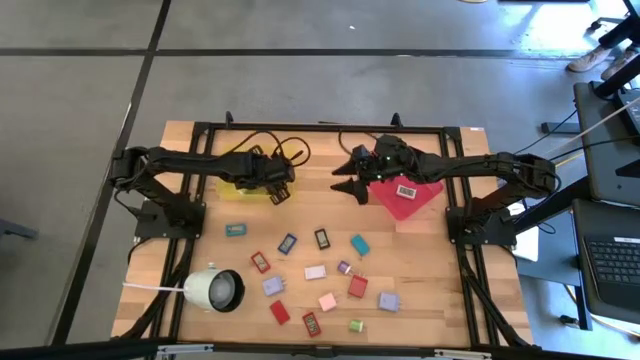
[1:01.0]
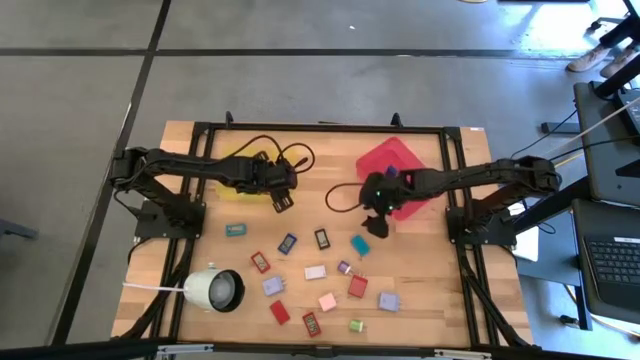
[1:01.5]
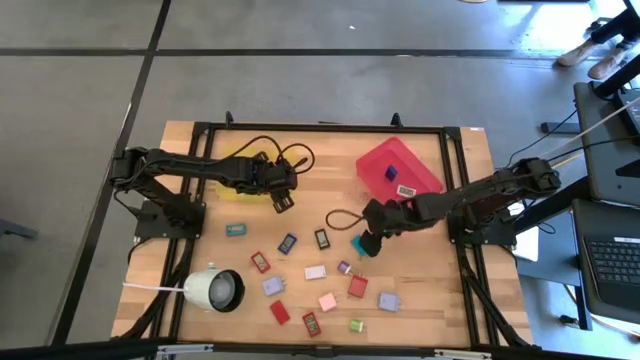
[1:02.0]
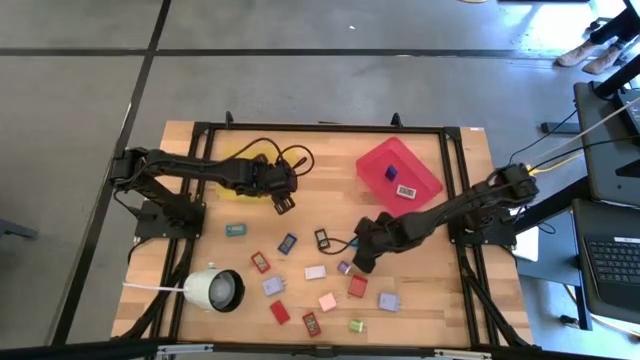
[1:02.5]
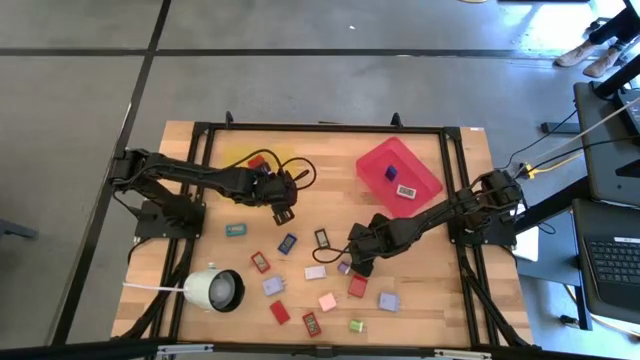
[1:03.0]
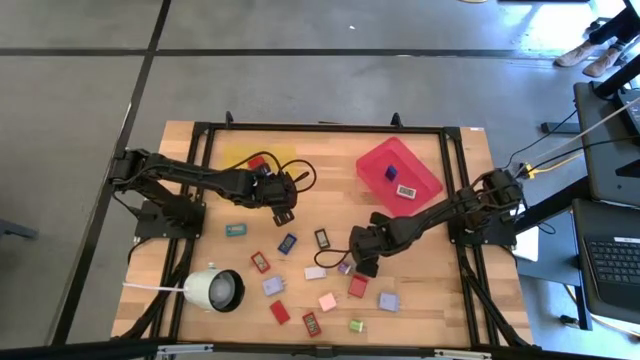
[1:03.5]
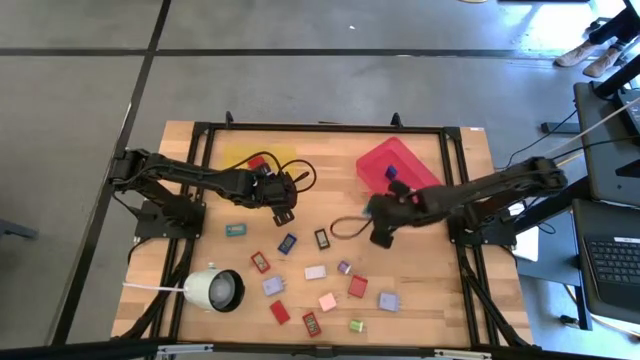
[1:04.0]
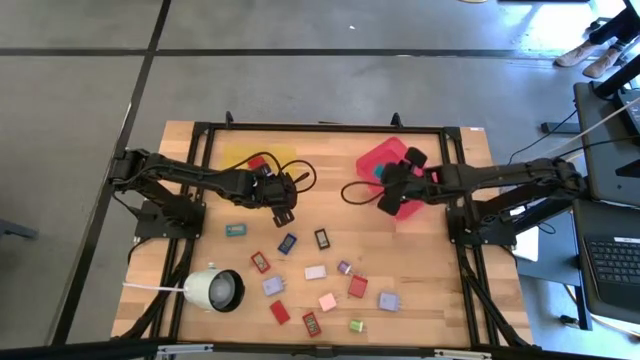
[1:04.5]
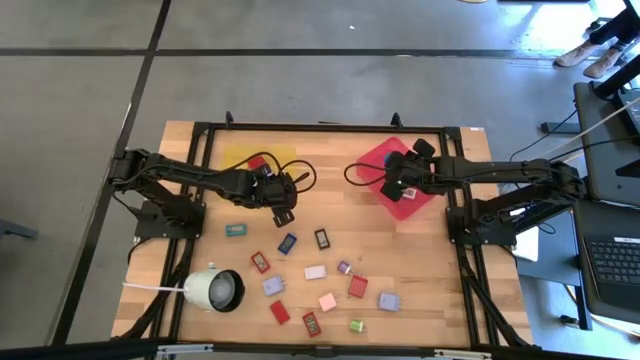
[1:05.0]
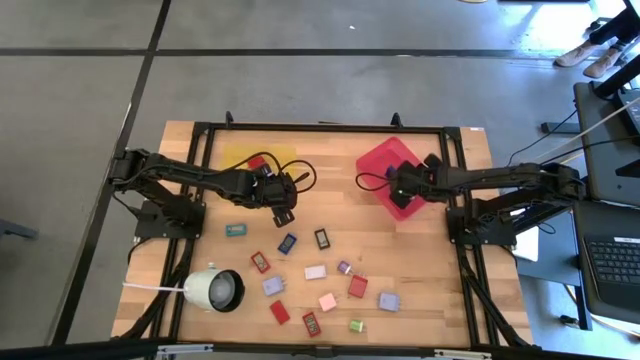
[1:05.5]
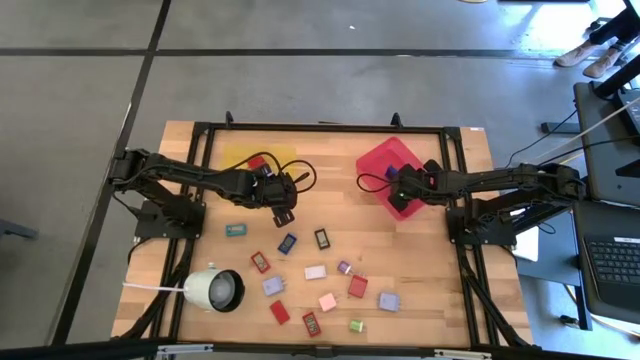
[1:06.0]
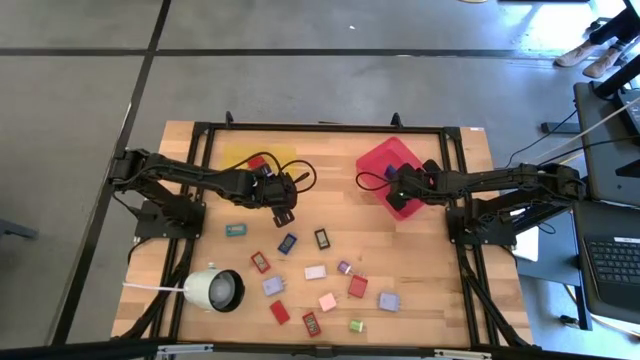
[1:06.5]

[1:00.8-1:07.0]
Task: Pick & Place Office items
Put the right light blue digital clock into the pink bin

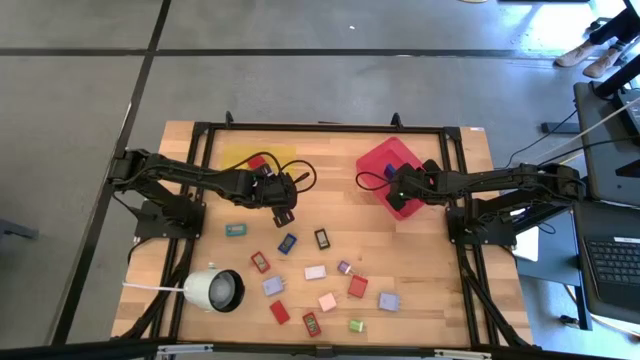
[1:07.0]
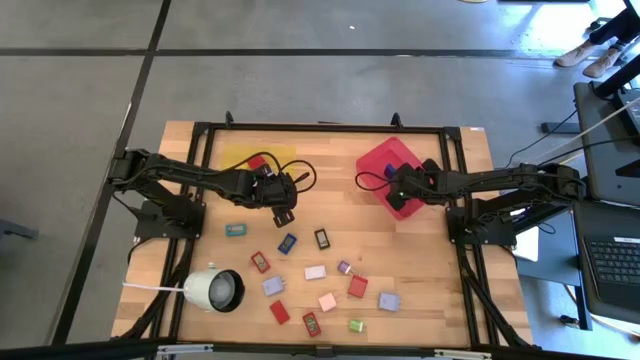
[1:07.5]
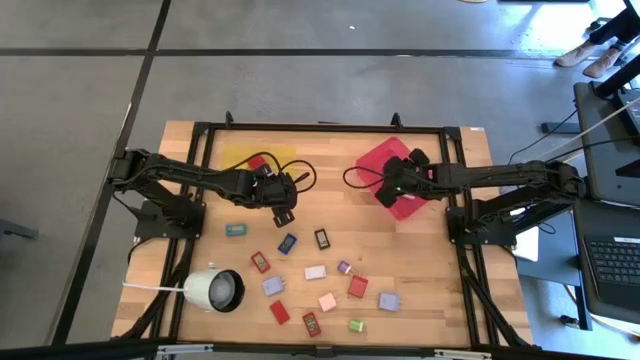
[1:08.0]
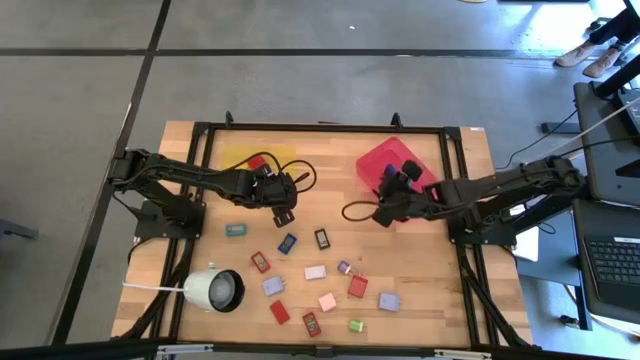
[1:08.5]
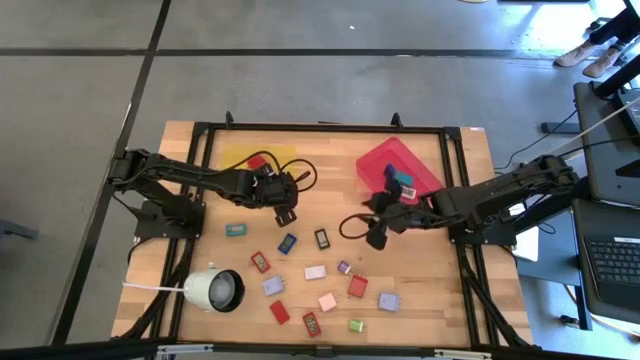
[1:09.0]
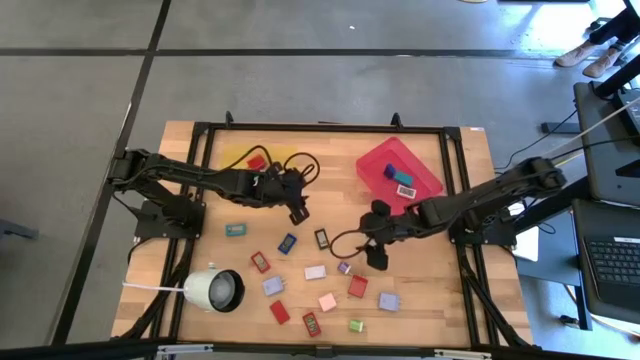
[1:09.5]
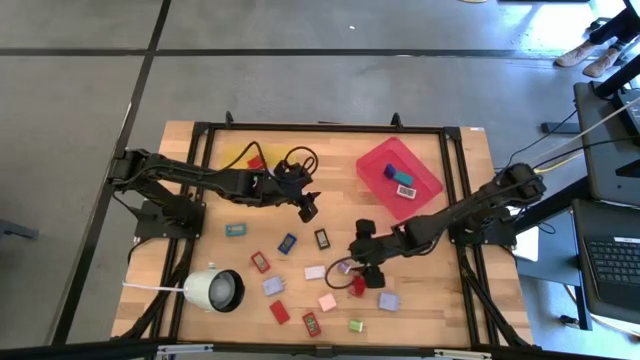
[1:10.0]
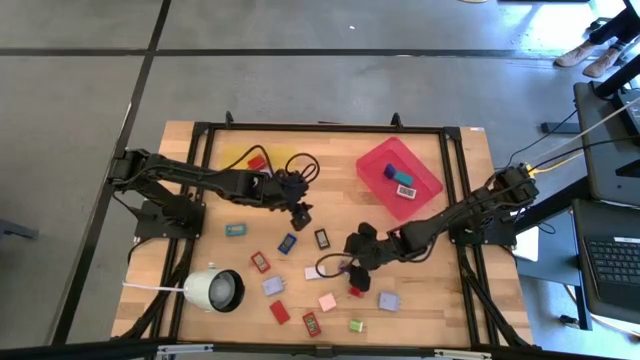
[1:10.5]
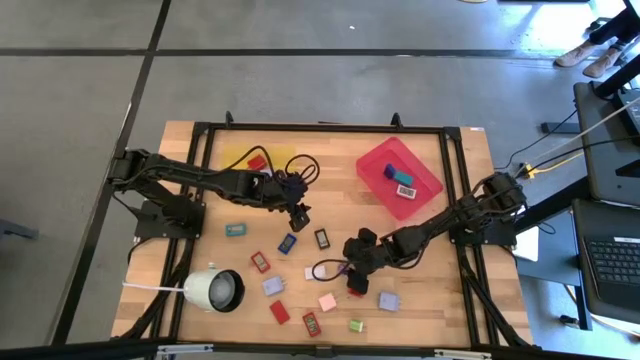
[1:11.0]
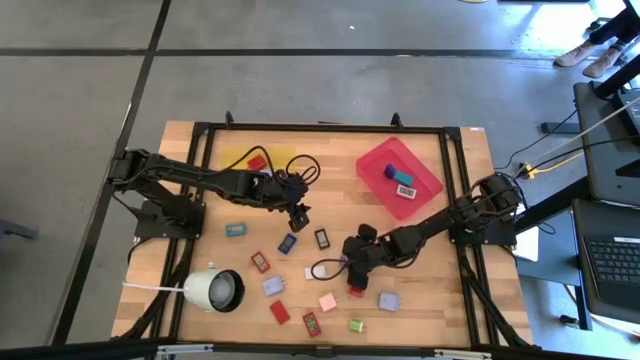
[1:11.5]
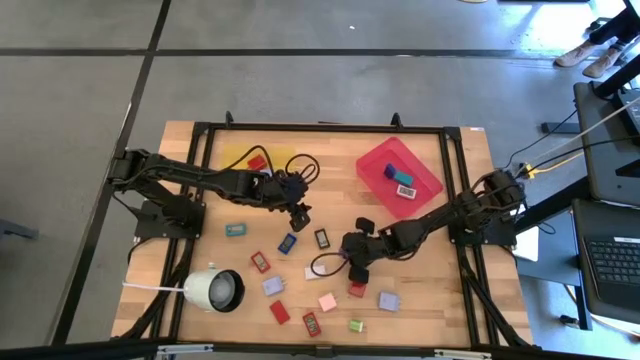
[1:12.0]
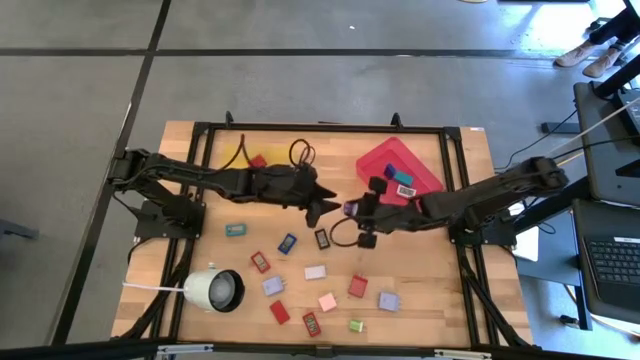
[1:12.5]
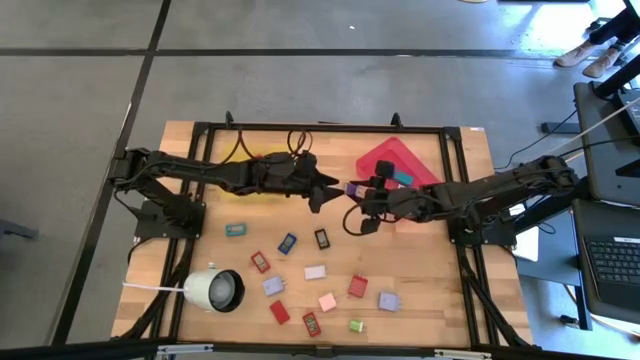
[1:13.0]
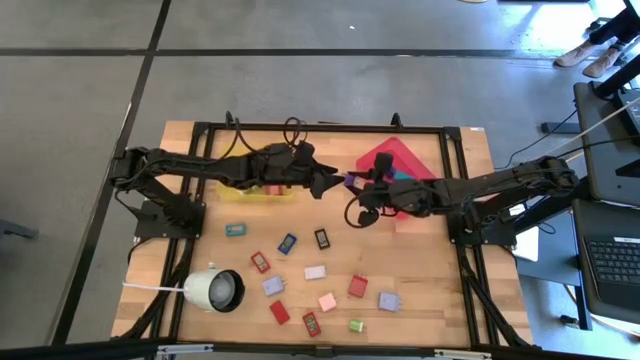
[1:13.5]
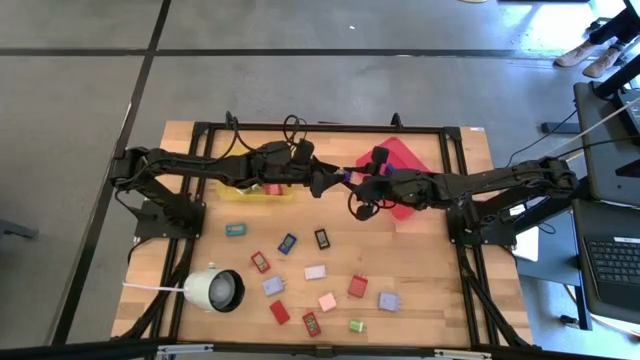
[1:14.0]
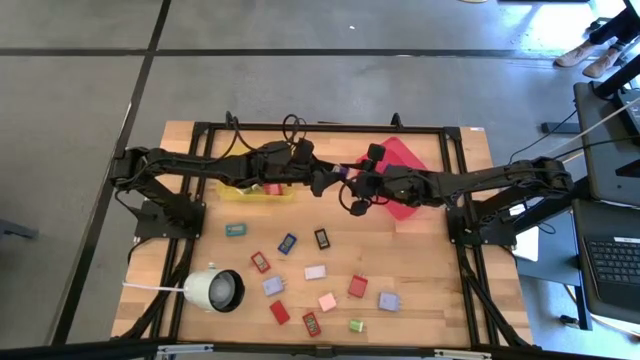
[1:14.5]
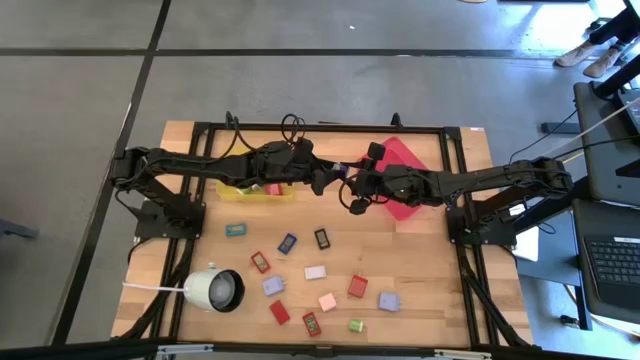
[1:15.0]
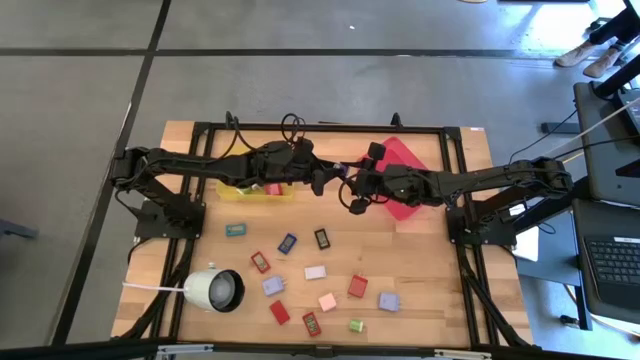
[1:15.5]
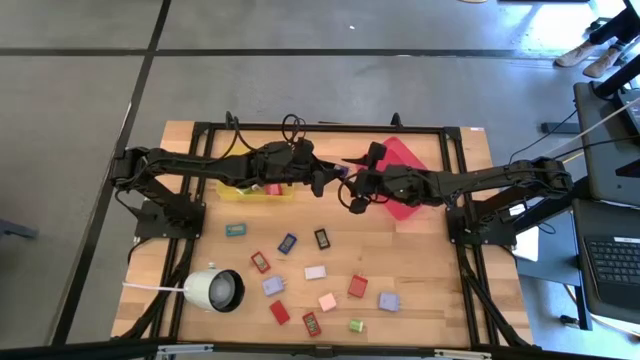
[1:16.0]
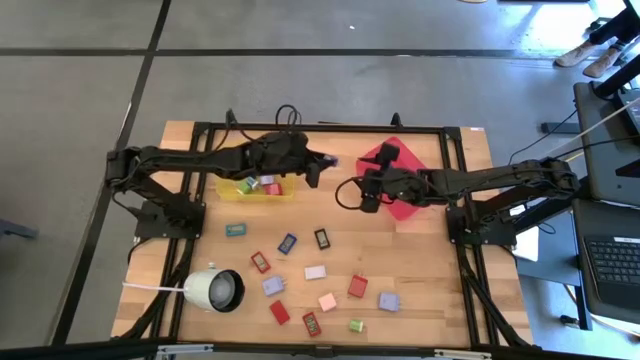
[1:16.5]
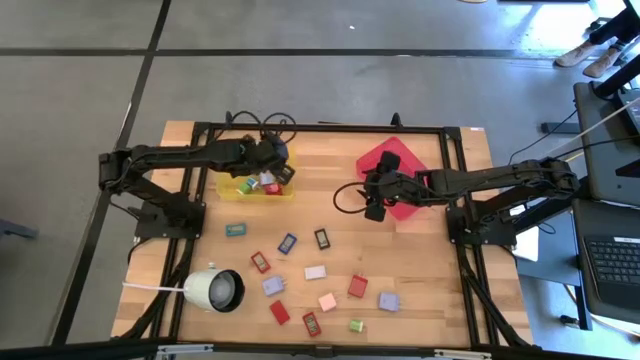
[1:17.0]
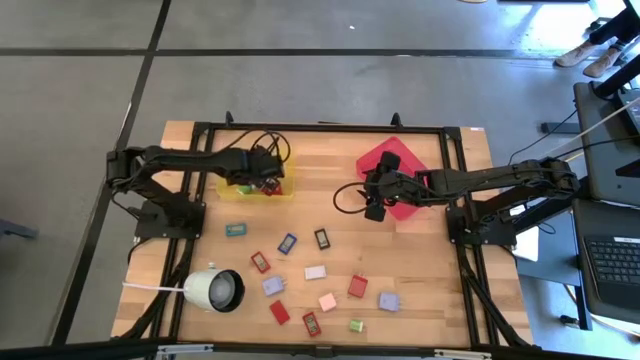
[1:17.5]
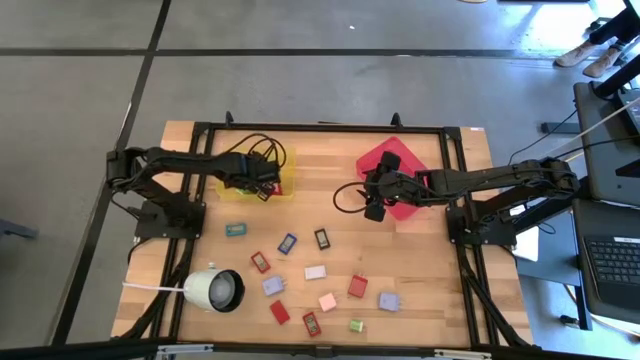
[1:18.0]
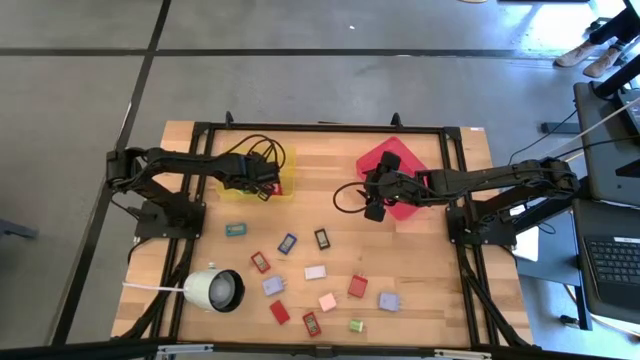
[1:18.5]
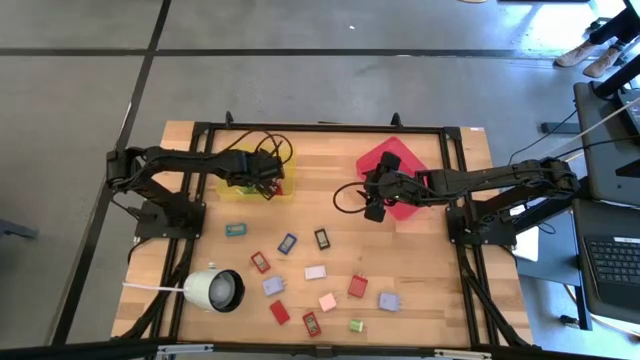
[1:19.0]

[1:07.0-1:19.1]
Put the purple charger adapter into the yellow bin

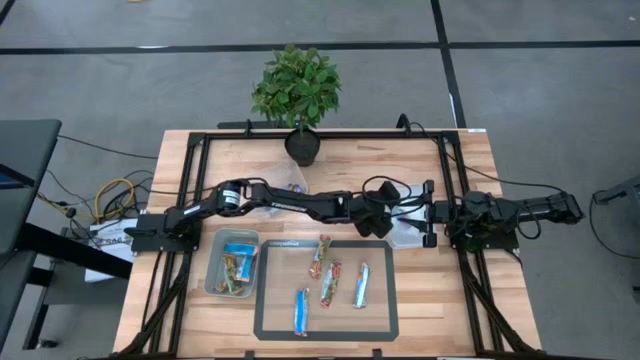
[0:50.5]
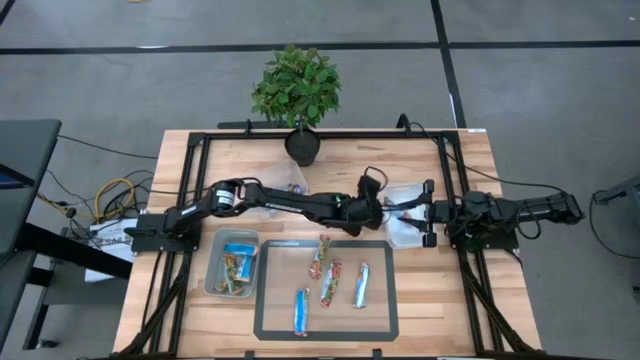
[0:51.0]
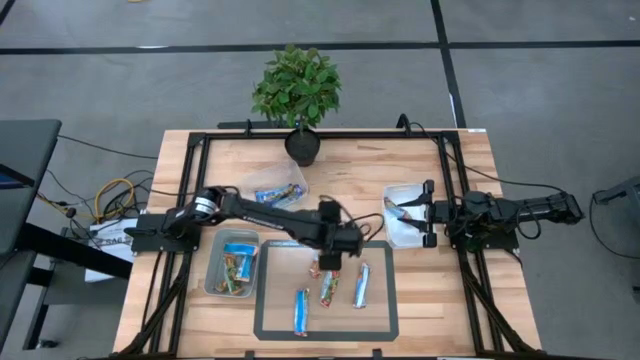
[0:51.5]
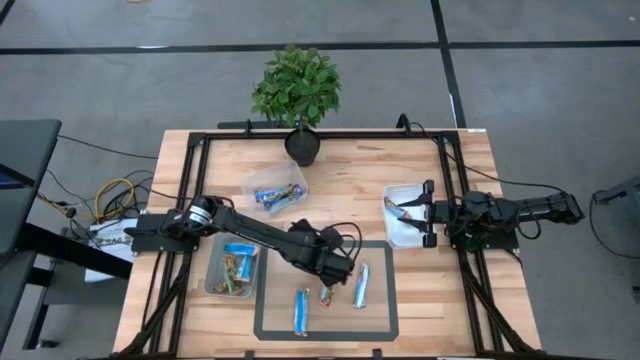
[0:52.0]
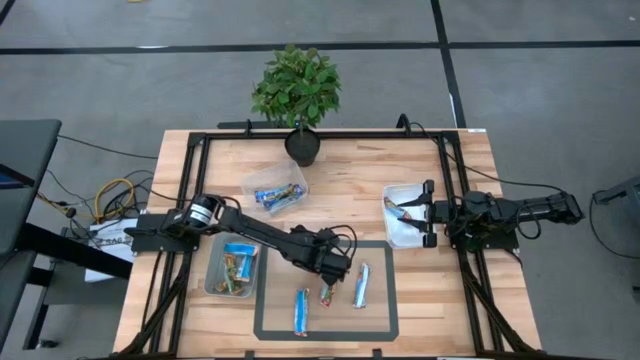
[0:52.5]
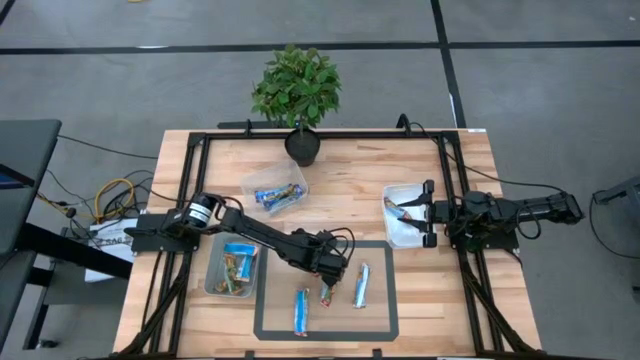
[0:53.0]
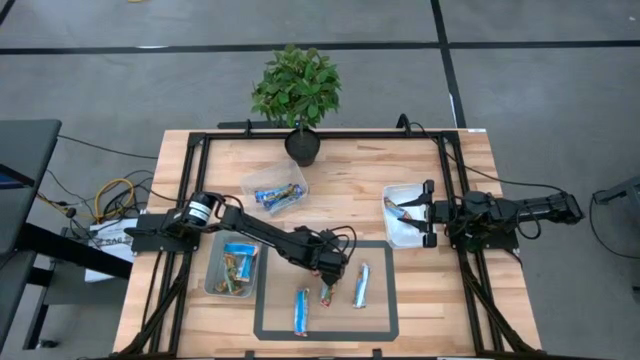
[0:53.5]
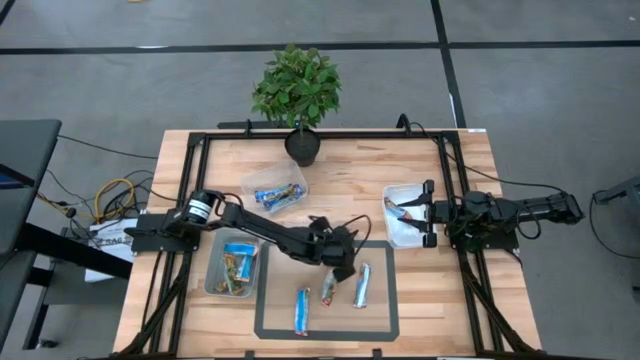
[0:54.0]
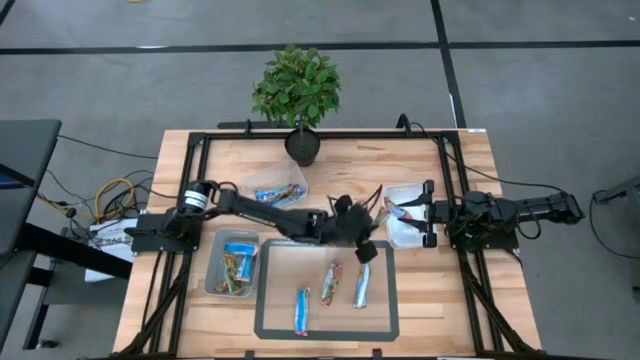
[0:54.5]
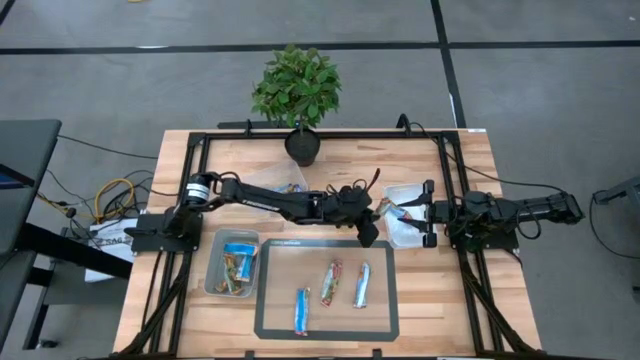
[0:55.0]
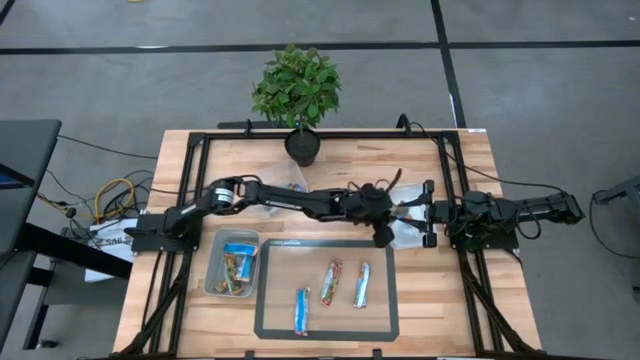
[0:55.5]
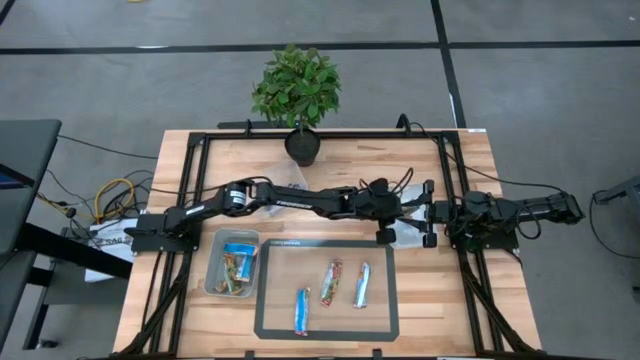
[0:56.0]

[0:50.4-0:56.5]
Task: Pick and place Granola Bars by type
Put the red granola bar into the white bin
